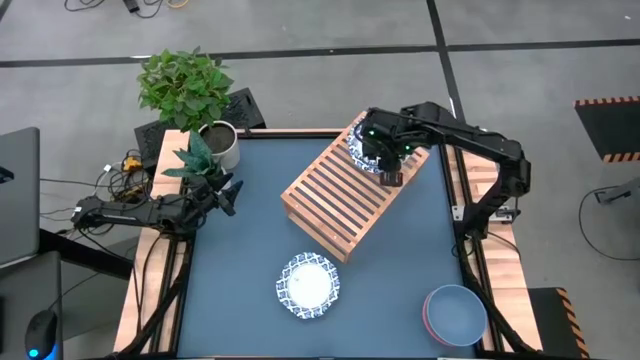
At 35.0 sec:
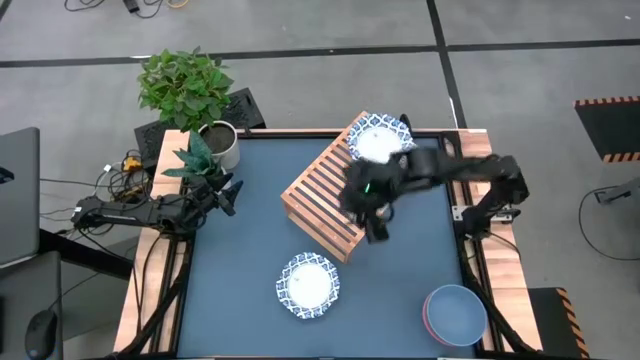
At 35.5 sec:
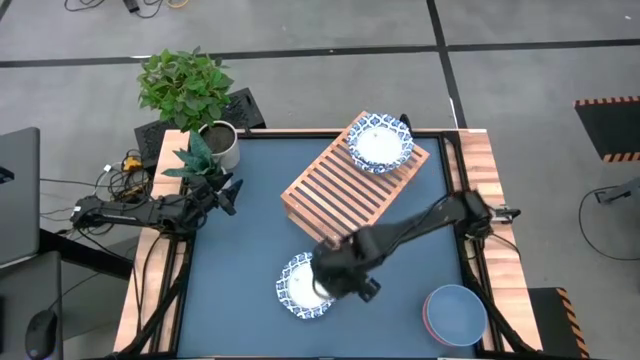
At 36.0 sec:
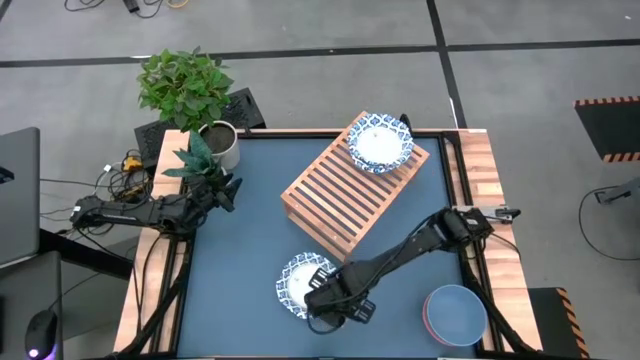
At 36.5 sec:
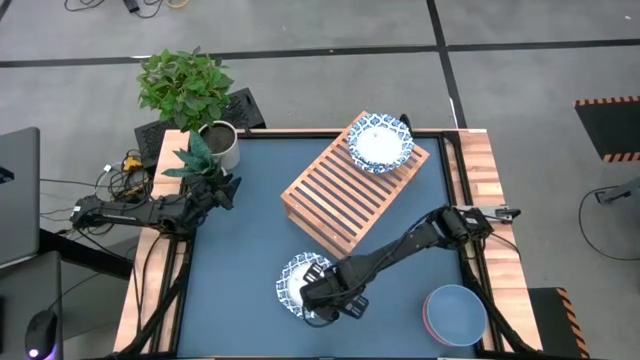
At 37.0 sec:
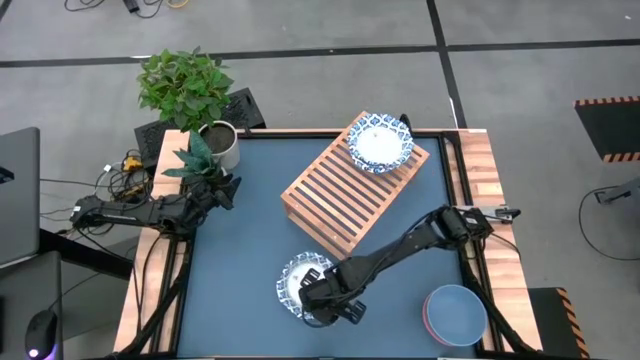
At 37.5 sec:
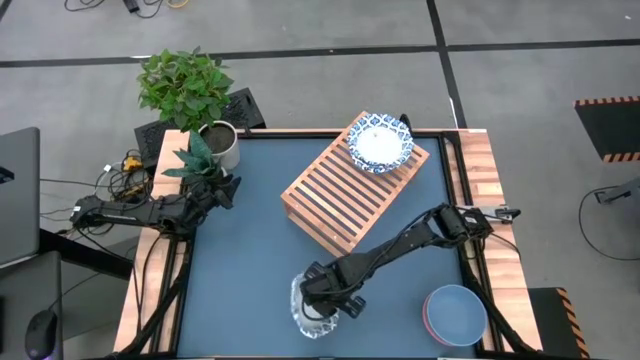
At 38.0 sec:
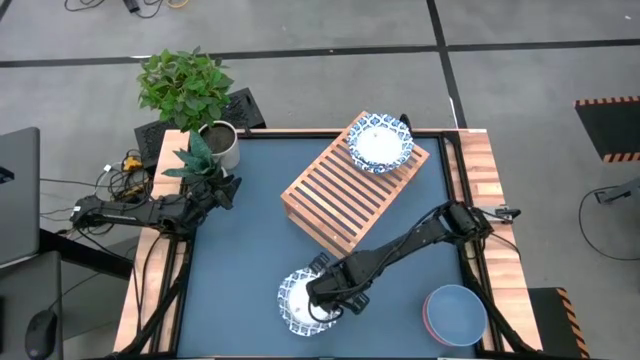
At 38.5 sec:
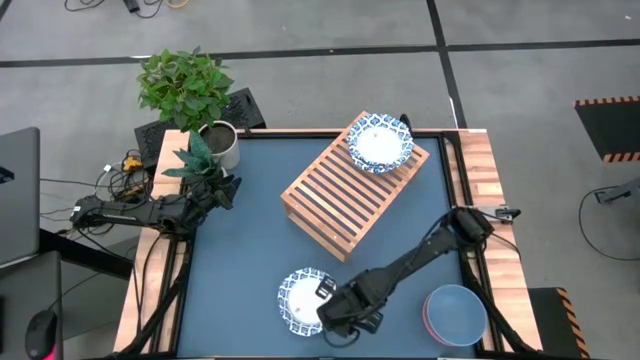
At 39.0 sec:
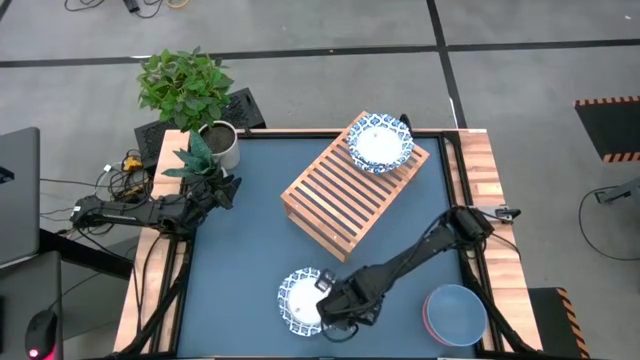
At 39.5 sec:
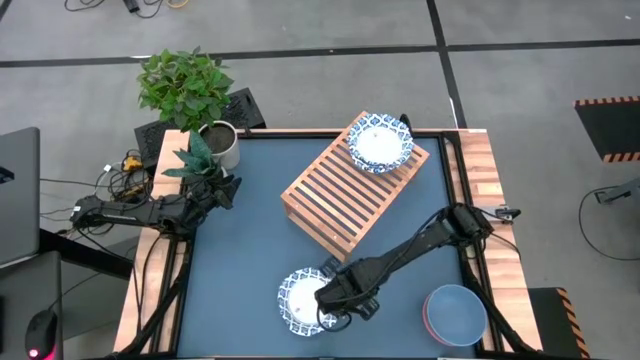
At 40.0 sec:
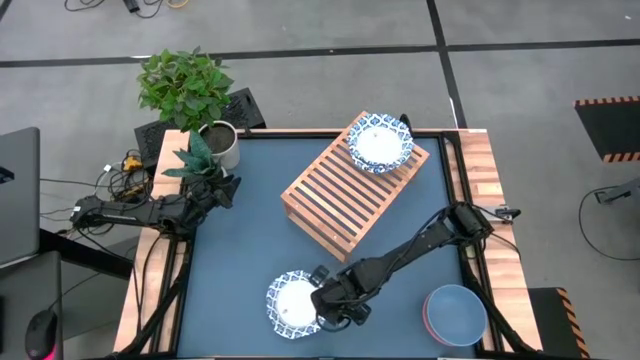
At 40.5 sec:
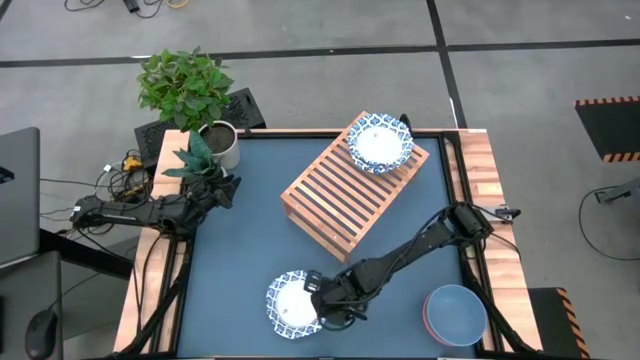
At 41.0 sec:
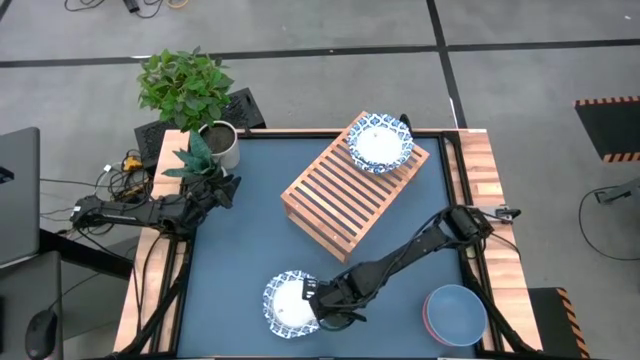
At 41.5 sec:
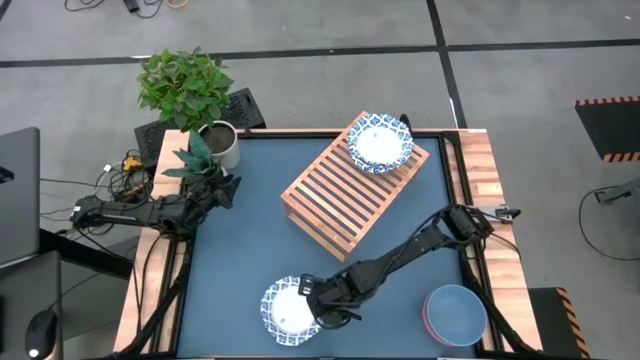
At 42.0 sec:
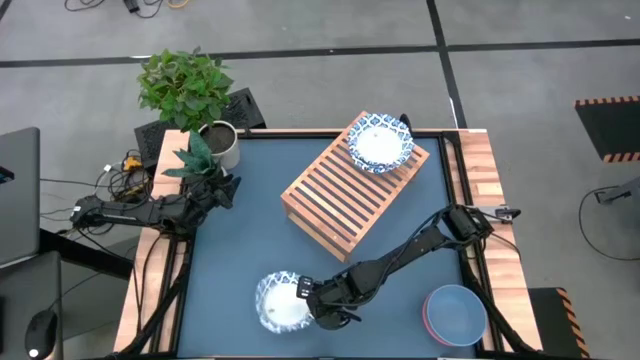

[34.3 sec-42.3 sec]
Task: Place and stack bowls onto a shelf
Stack the white and blue patterned bowl on top of the white and blue patterned bowl on the shelf

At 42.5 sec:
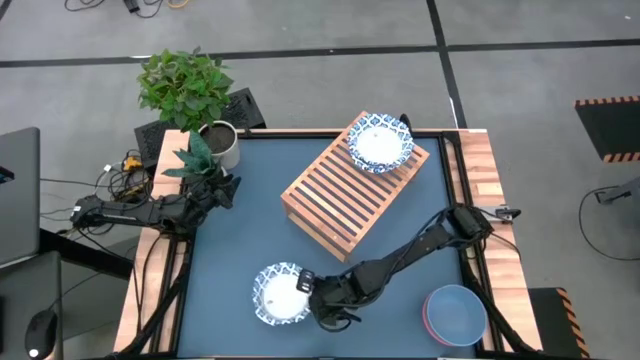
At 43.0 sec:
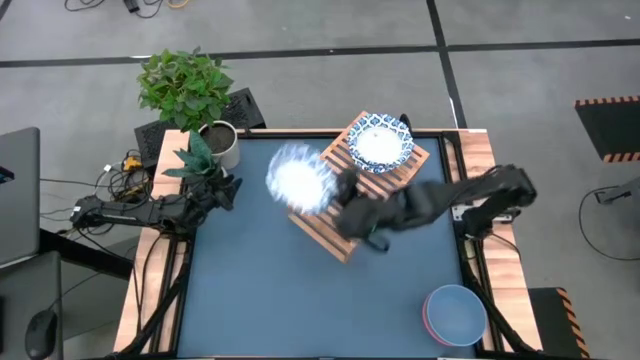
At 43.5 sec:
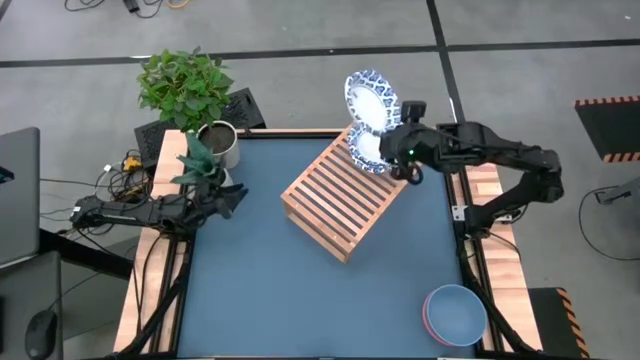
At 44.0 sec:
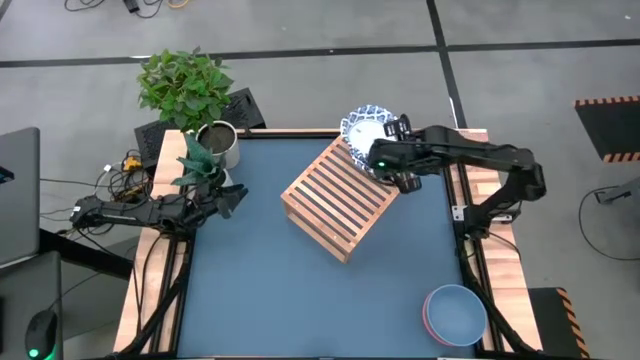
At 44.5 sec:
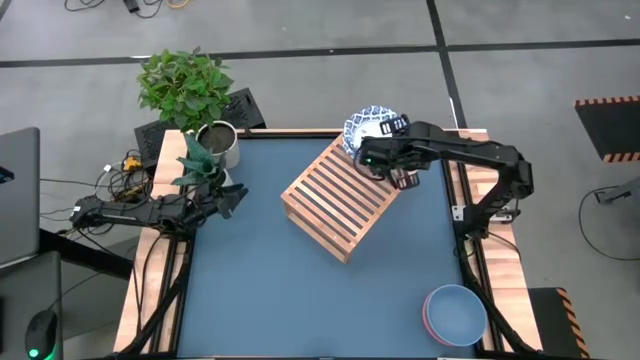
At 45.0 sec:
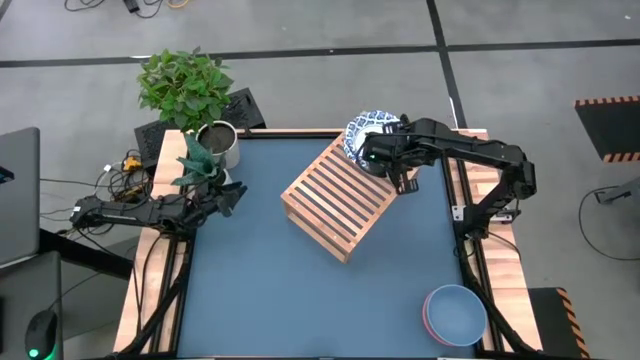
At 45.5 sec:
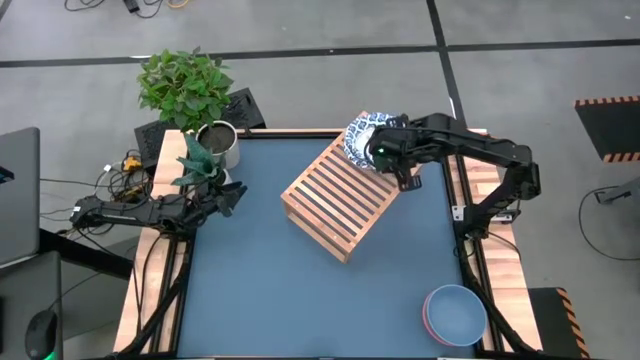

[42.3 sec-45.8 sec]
Stack the white and blue patterned bowl on top of the white and blue patterned bowl on the shelf

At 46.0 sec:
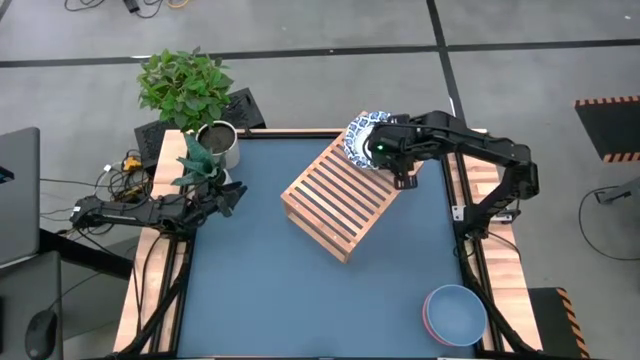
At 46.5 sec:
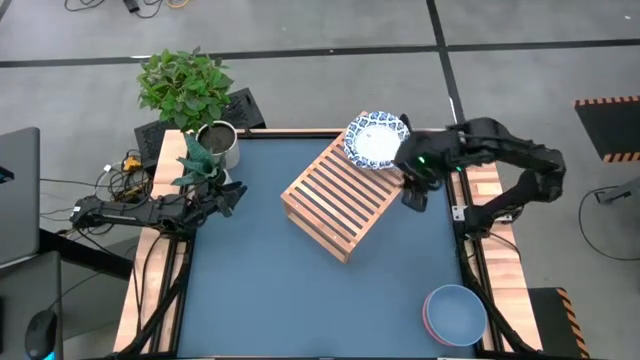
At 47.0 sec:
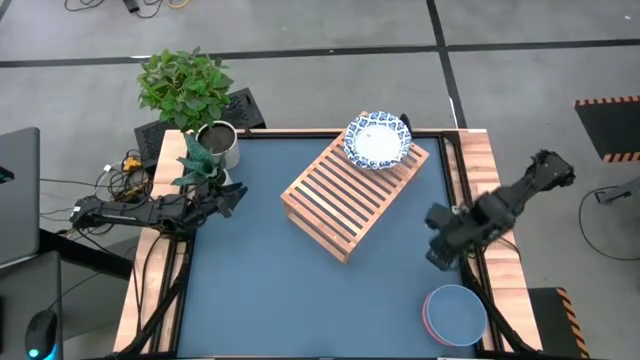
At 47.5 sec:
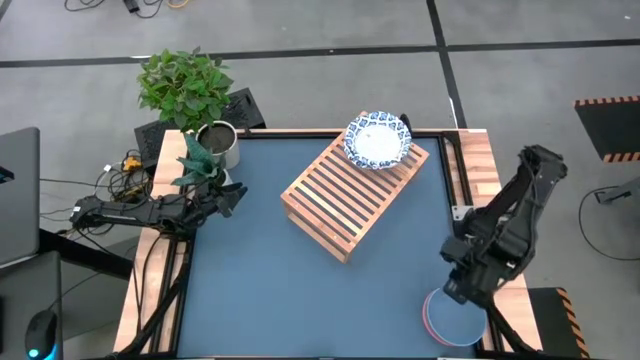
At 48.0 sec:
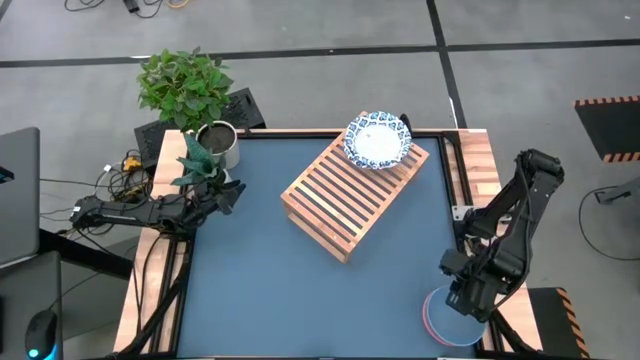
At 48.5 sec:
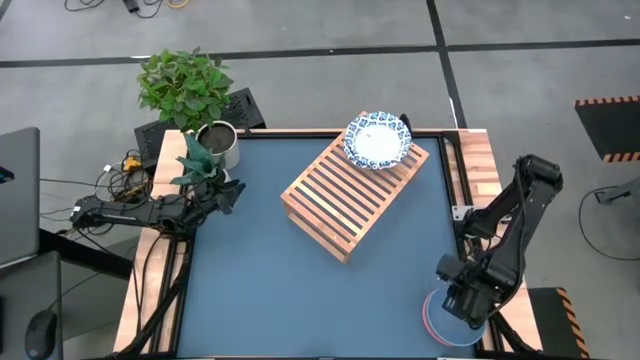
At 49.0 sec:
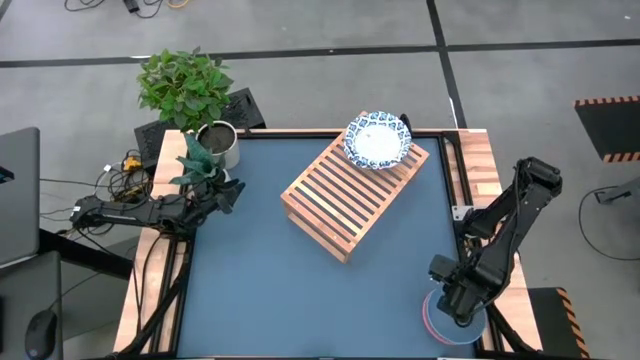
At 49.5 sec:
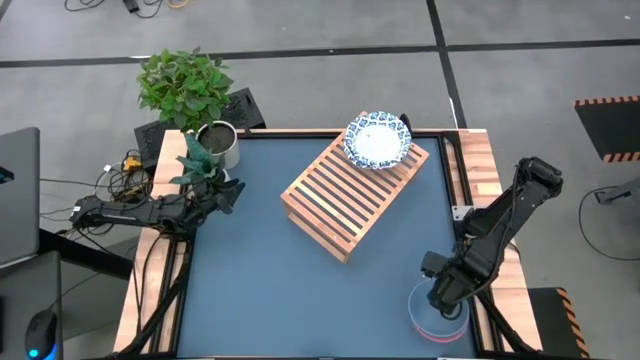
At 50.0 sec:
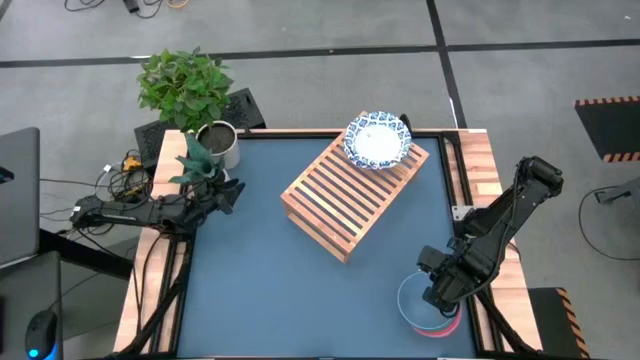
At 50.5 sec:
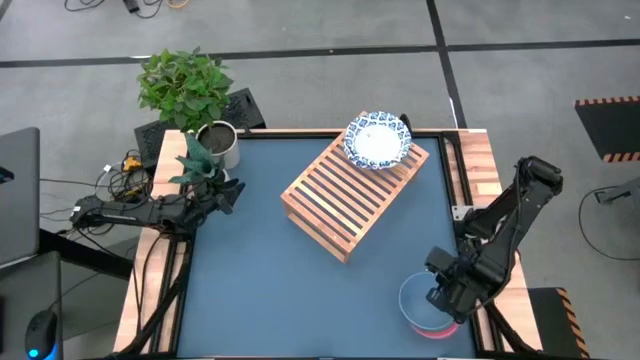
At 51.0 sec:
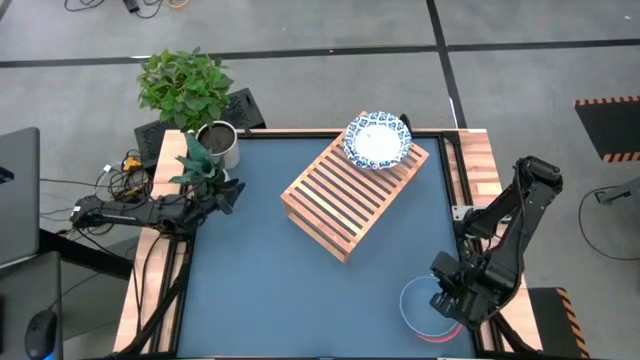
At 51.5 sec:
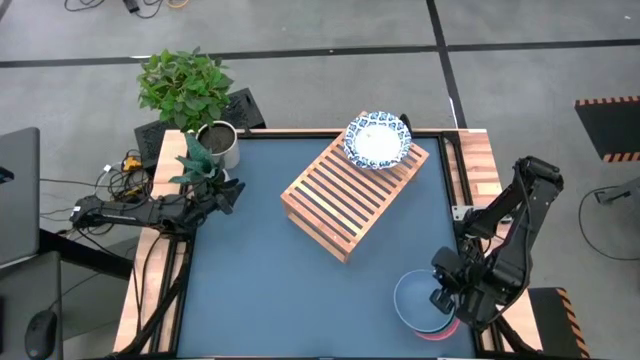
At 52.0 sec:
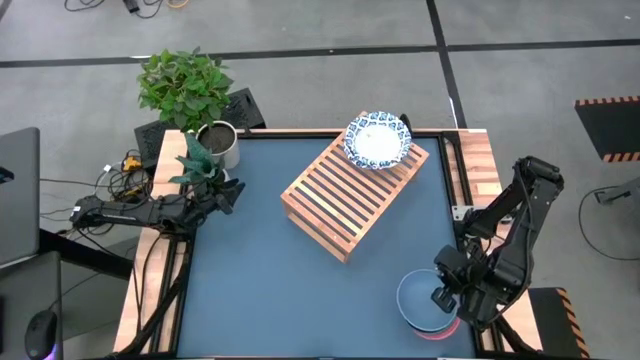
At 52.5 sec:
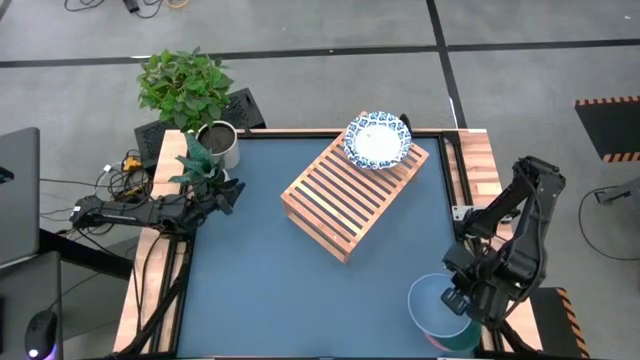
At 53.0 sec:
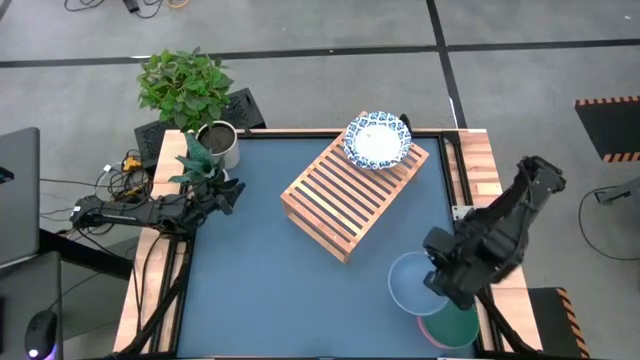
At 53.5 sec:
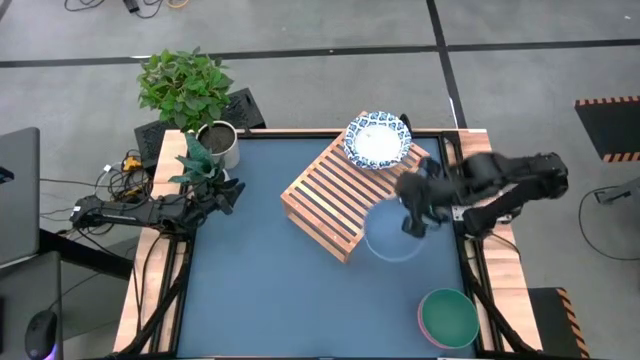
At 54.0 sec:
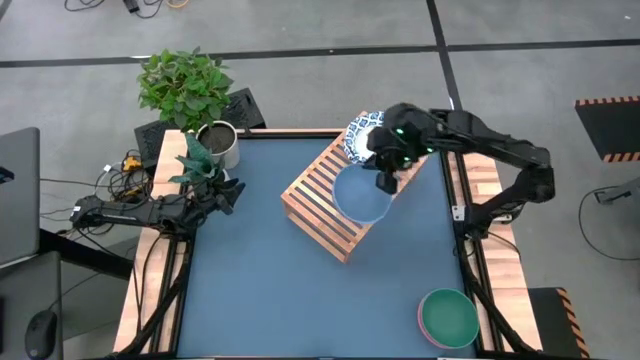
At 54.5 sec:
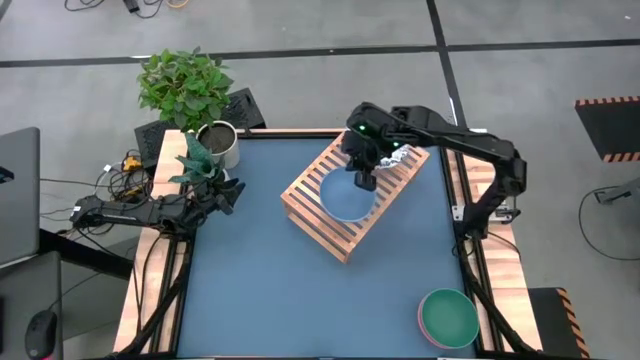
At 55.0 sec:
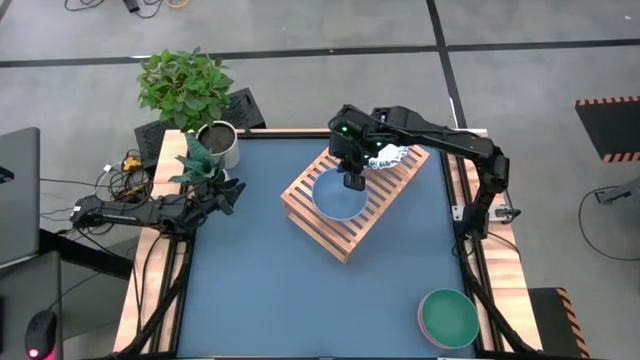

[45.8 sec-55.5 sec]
Put the blue bowl on the shelf
